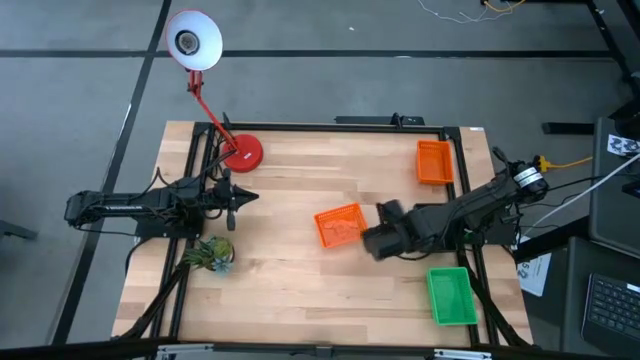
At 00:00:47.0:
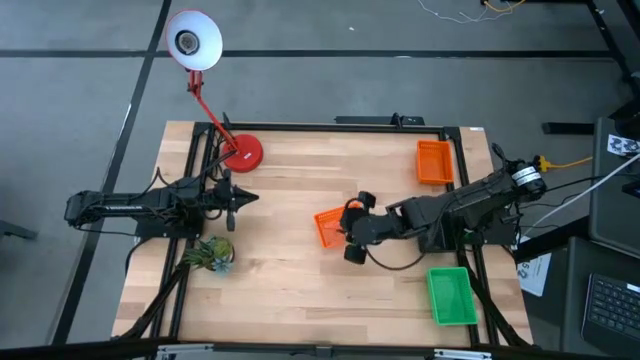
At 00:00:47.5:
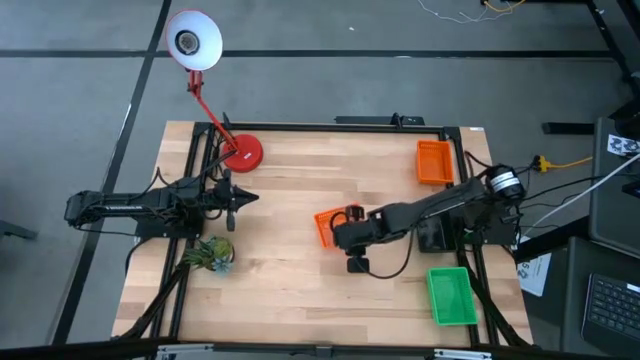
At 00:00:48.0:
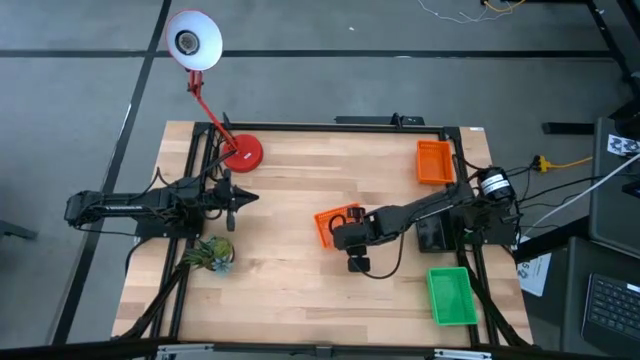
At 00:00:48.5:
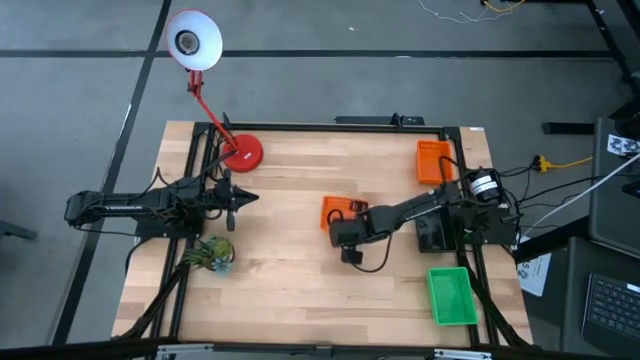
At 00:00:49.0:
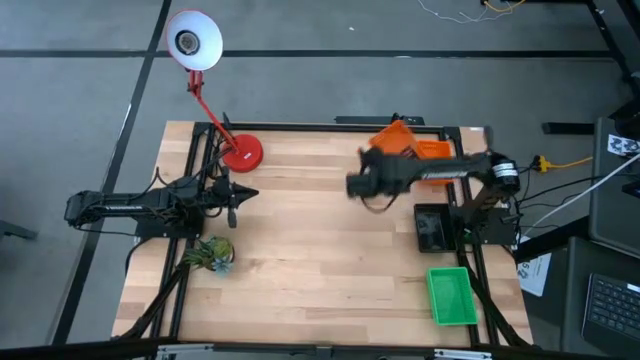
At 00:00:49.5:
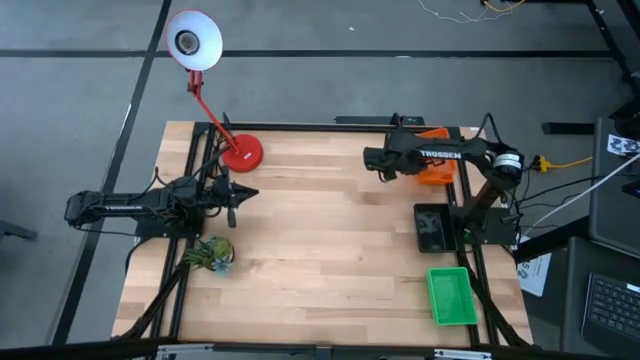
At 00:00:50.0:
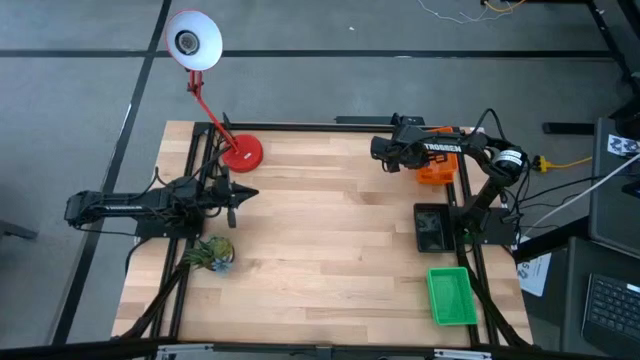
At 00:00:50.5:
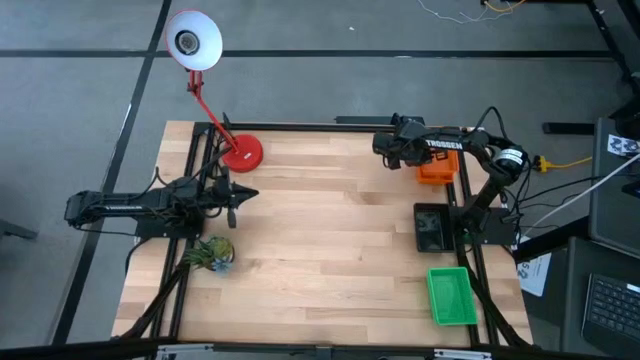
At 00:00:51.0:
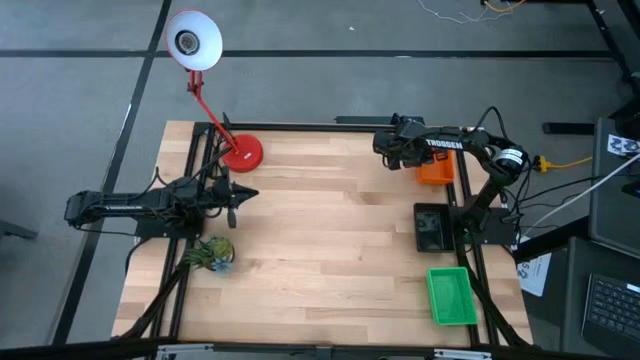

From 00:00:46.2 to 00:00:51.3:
Stack the bottom orange bin on the top orange bin

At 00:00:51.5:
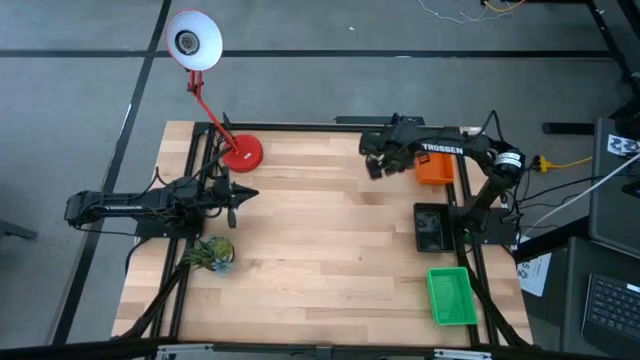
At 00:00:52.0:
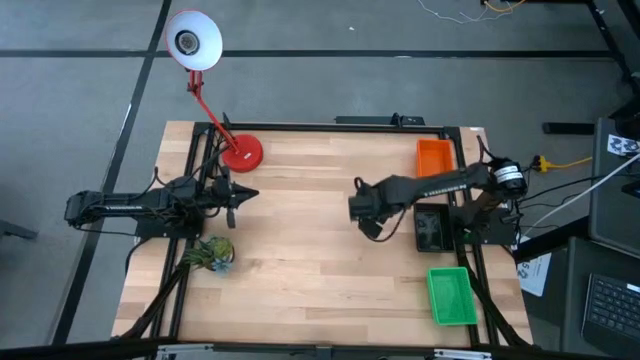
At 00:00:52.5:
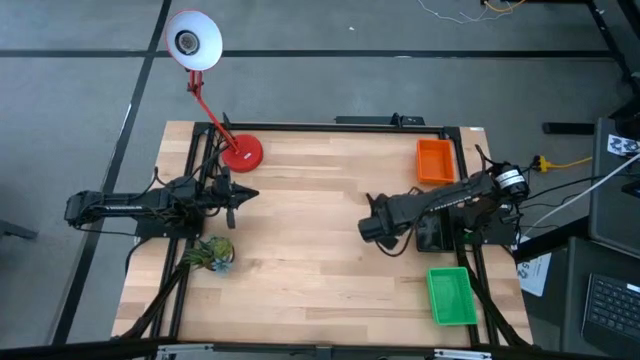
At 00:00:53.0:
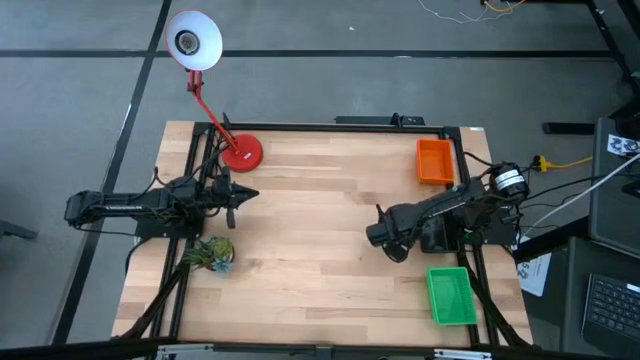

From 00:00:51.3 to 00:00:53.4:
Adjust the stacked black bins

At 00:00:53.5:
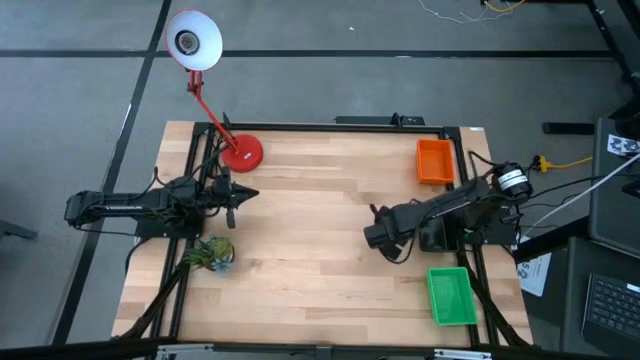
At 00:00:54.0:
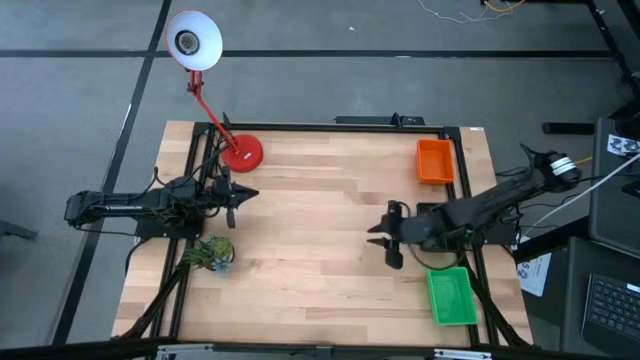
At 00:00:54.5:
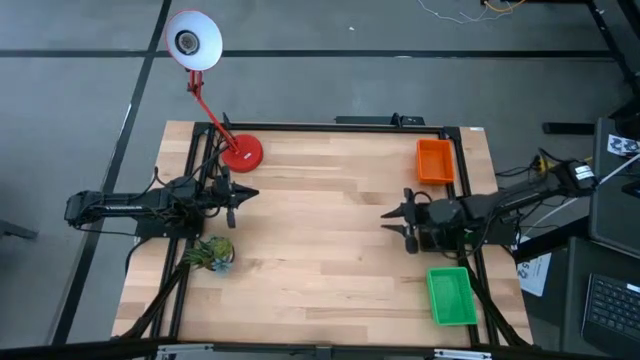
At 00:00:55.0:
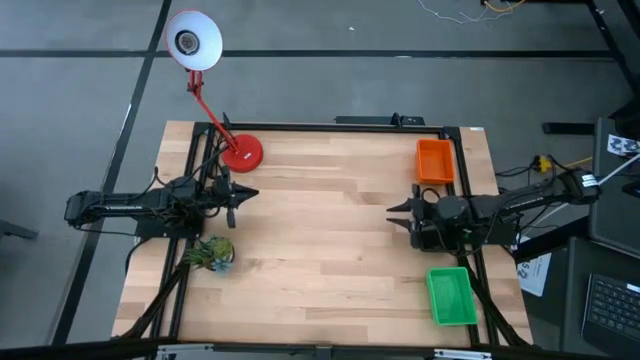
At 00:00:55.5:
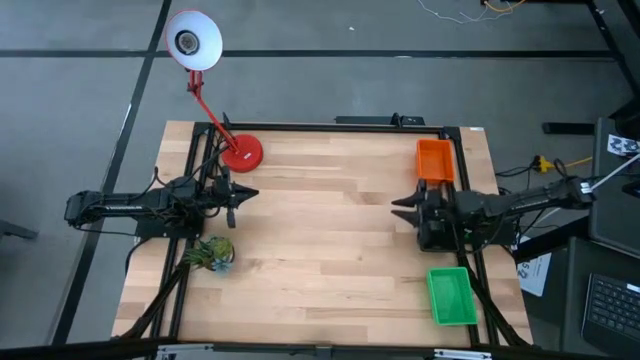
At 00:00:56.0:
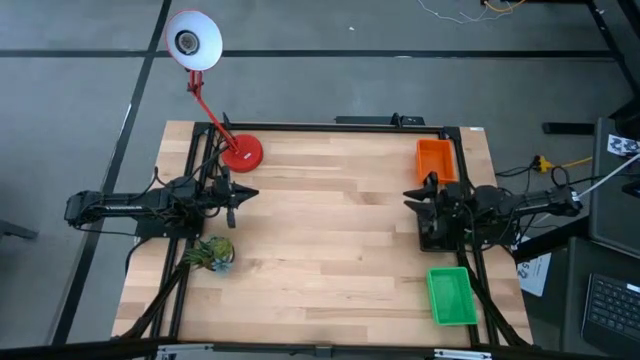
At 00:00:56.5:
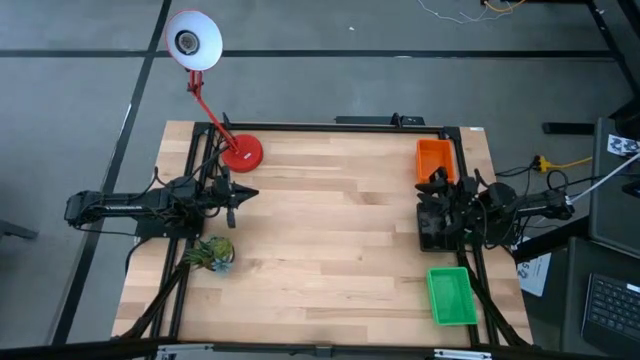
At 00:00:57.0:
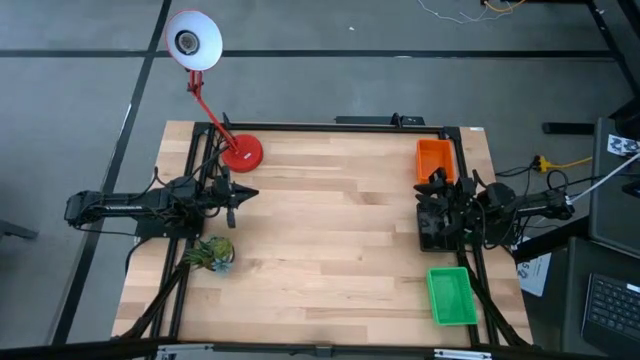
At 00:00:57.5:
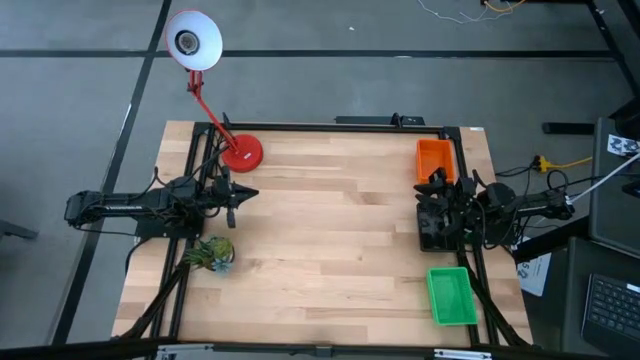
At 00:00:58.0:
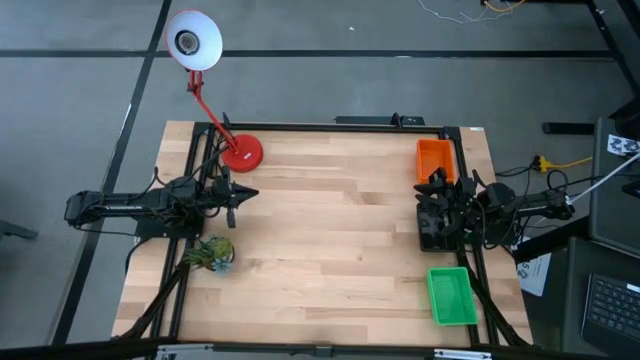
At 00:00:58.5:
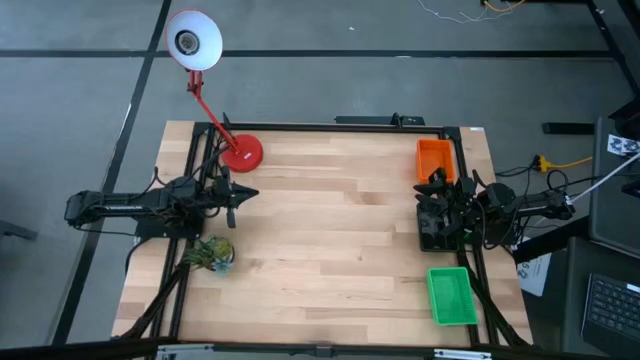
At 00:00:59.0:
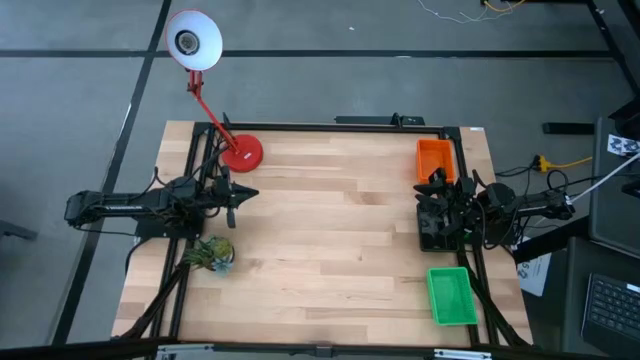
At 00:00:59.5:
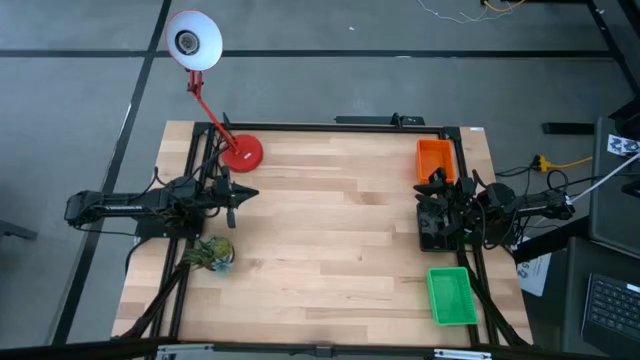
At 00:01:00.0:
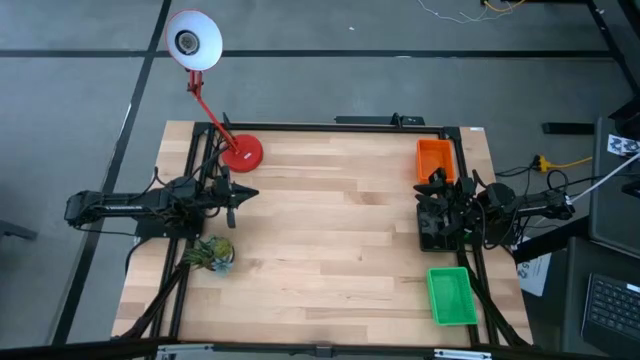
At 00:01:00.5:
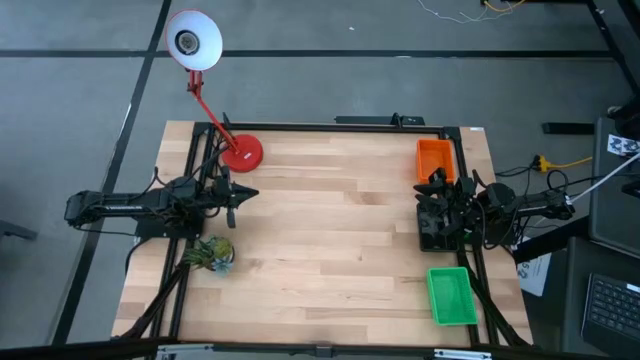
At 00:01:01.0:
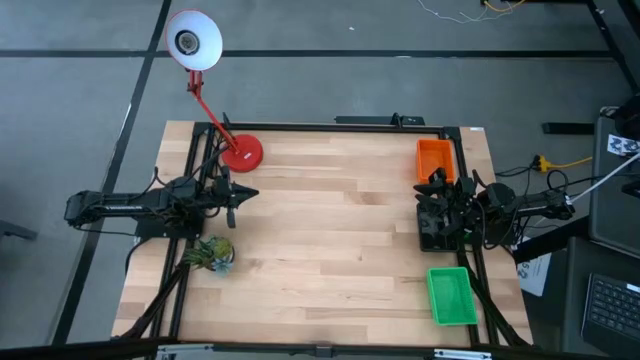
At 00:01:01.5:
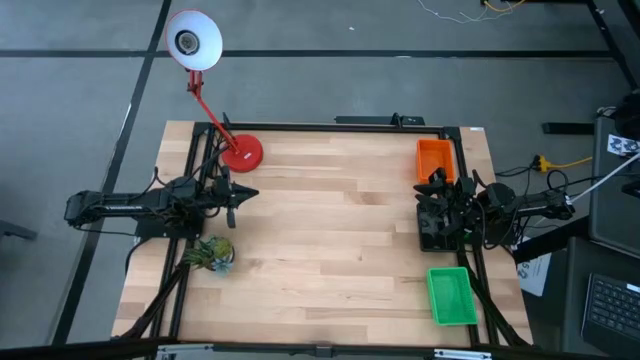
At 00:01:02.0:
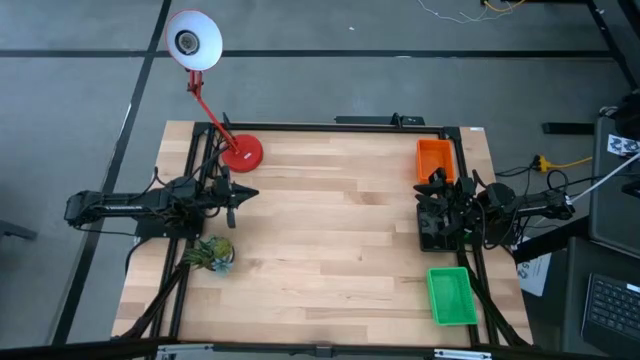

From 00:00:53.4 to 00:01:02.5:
Return to Home Position
